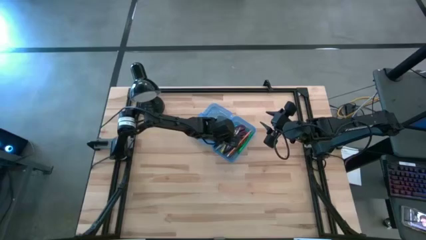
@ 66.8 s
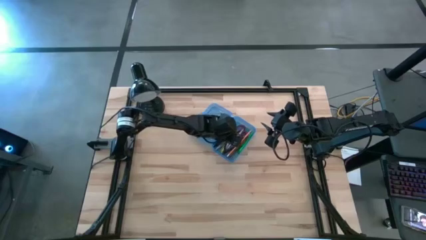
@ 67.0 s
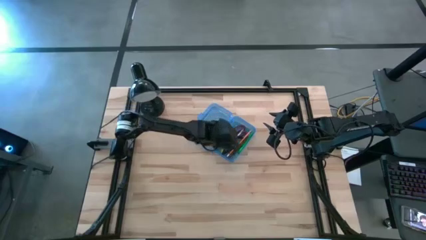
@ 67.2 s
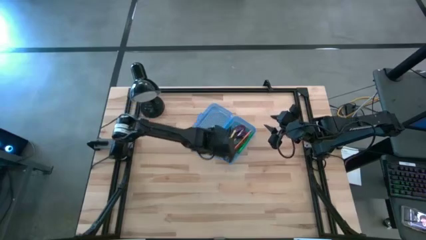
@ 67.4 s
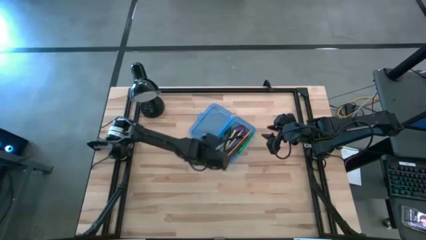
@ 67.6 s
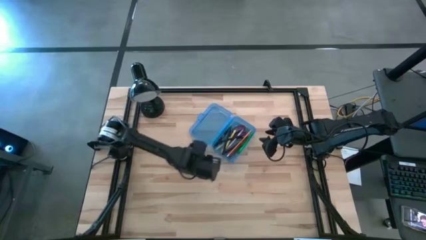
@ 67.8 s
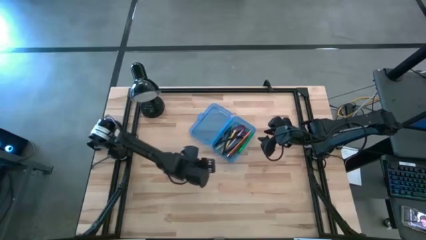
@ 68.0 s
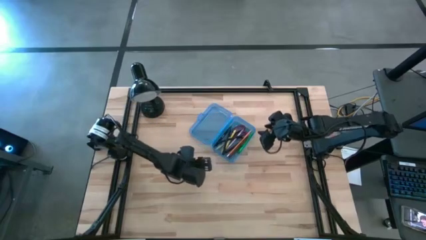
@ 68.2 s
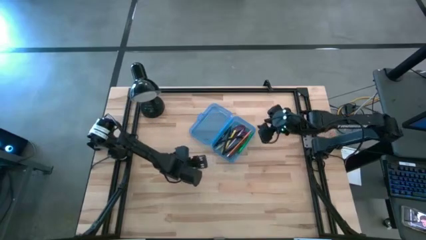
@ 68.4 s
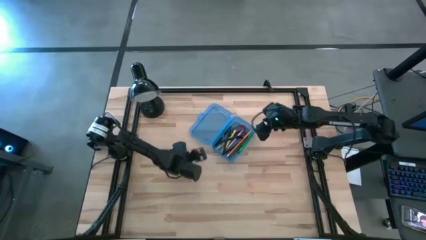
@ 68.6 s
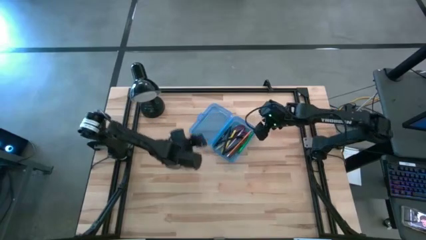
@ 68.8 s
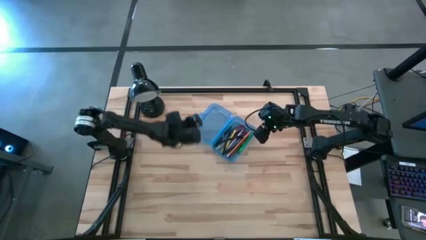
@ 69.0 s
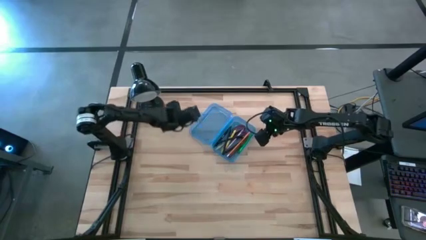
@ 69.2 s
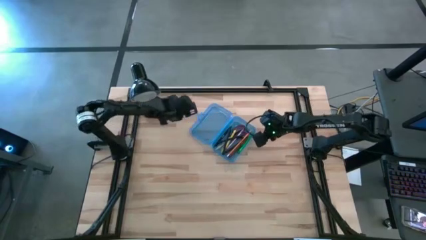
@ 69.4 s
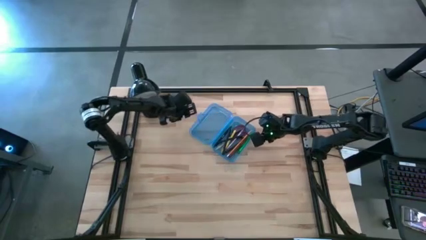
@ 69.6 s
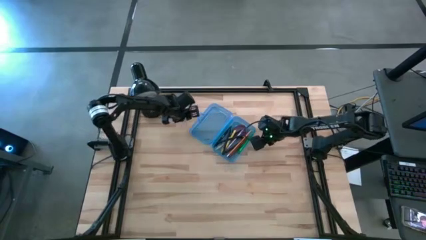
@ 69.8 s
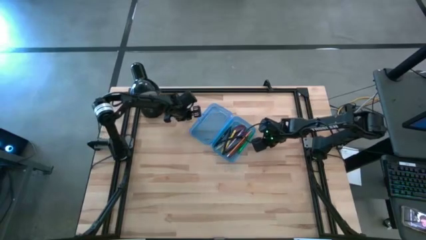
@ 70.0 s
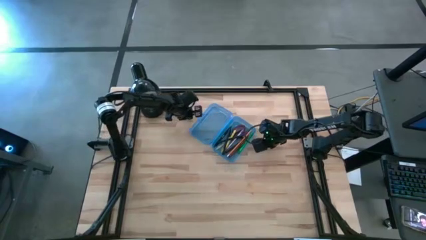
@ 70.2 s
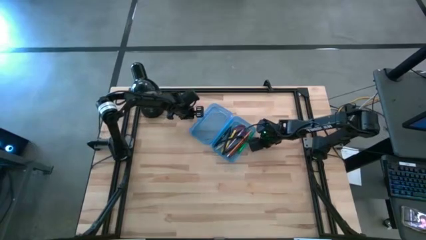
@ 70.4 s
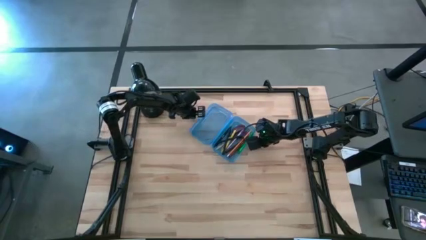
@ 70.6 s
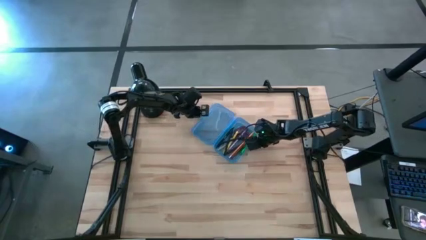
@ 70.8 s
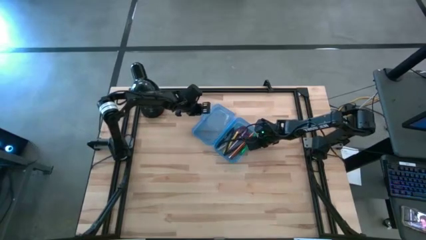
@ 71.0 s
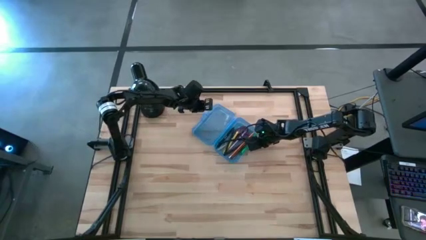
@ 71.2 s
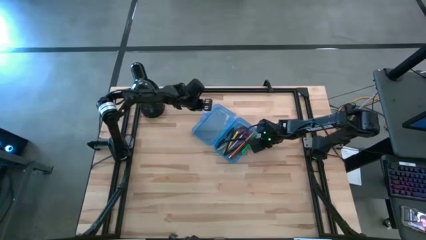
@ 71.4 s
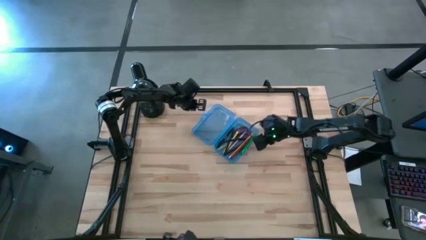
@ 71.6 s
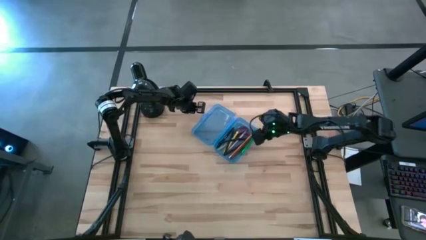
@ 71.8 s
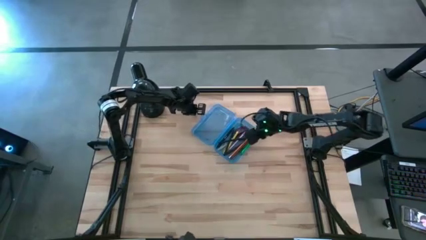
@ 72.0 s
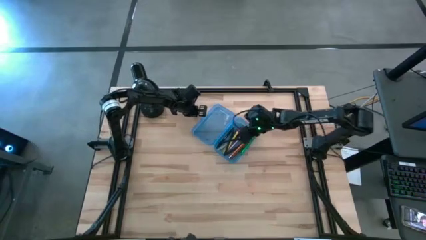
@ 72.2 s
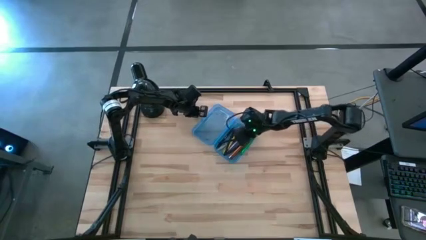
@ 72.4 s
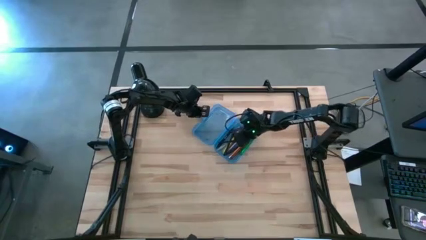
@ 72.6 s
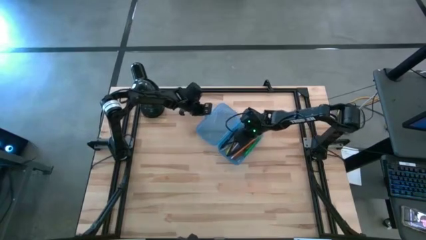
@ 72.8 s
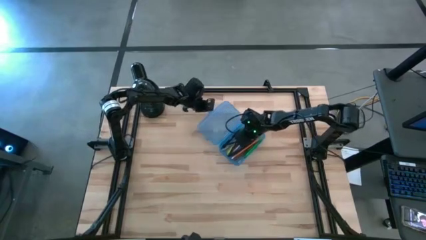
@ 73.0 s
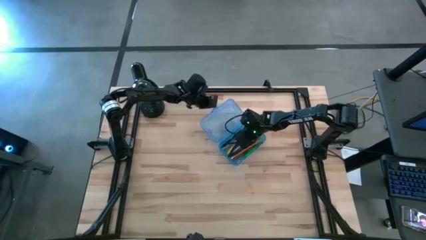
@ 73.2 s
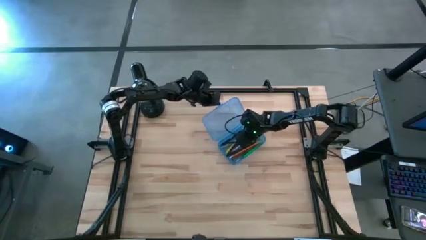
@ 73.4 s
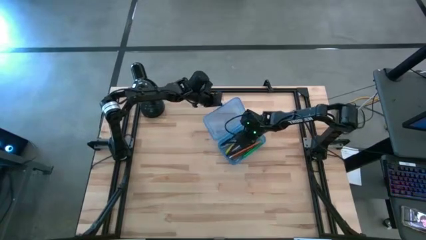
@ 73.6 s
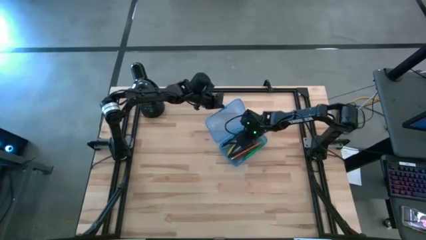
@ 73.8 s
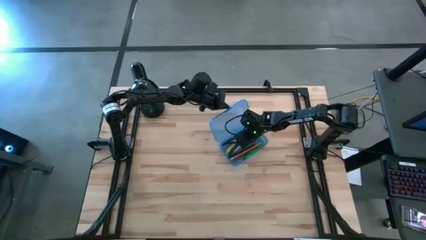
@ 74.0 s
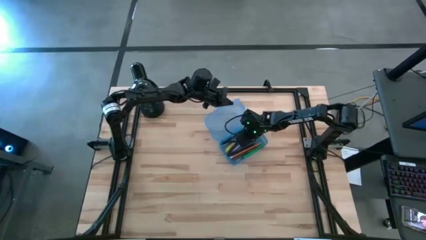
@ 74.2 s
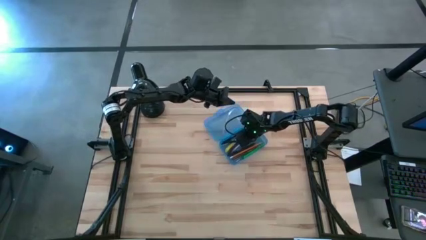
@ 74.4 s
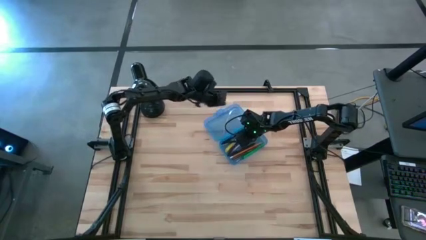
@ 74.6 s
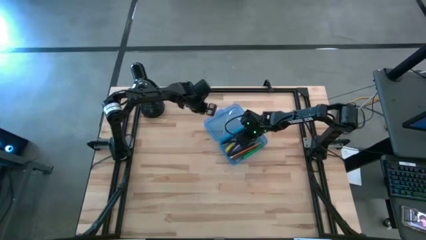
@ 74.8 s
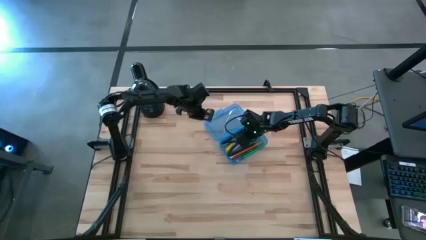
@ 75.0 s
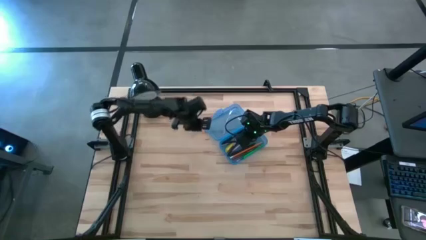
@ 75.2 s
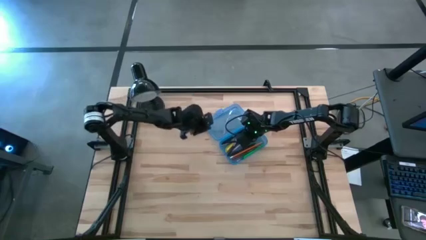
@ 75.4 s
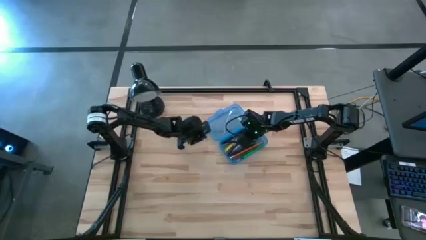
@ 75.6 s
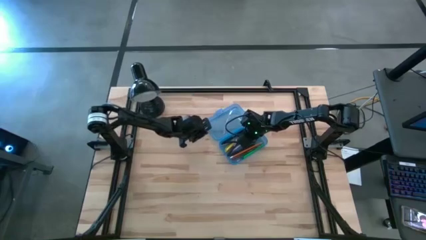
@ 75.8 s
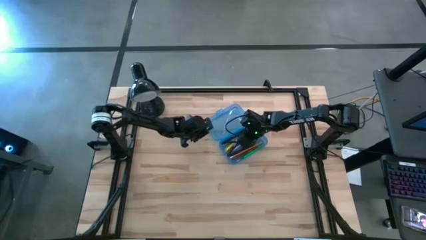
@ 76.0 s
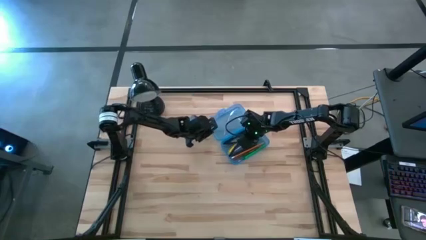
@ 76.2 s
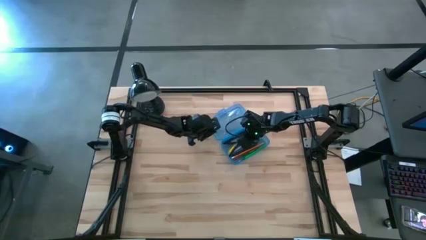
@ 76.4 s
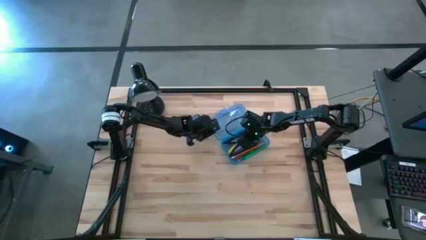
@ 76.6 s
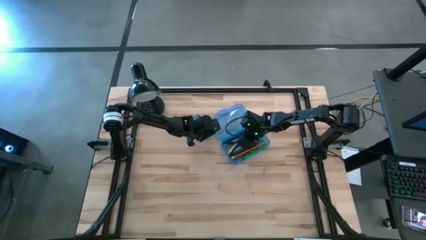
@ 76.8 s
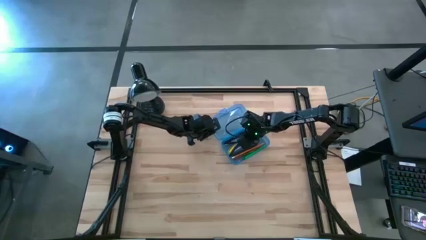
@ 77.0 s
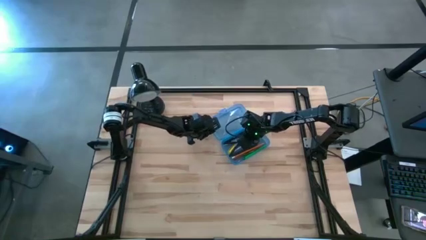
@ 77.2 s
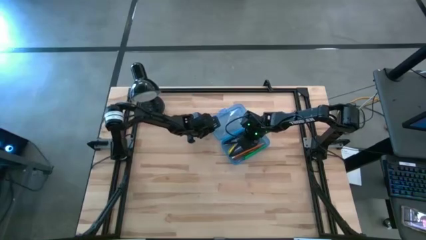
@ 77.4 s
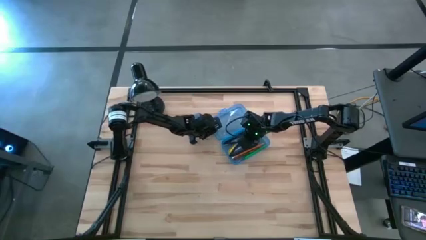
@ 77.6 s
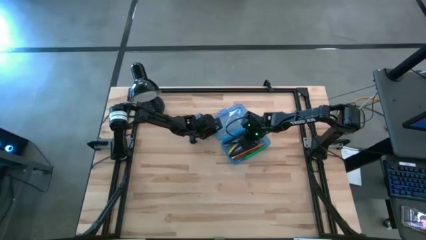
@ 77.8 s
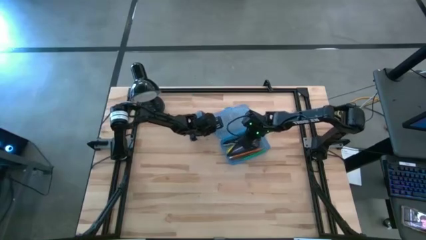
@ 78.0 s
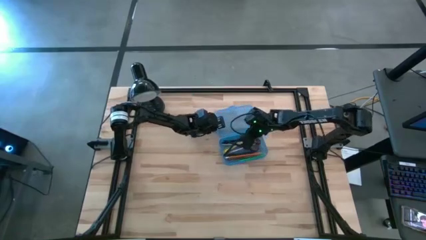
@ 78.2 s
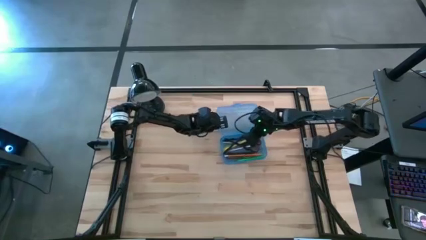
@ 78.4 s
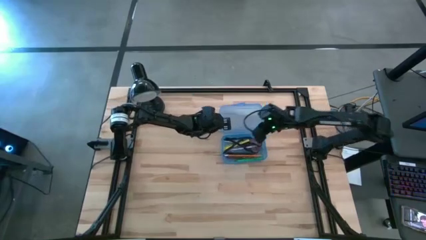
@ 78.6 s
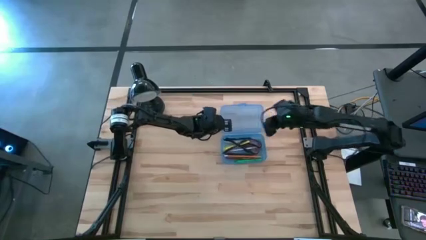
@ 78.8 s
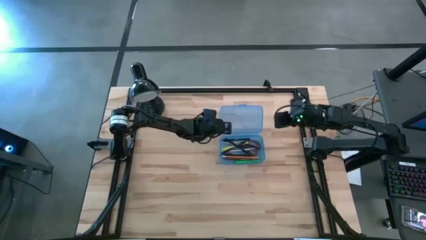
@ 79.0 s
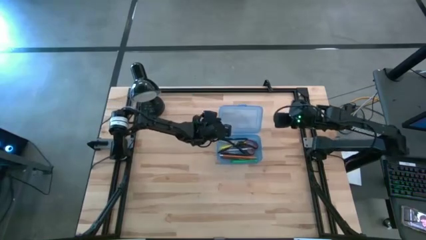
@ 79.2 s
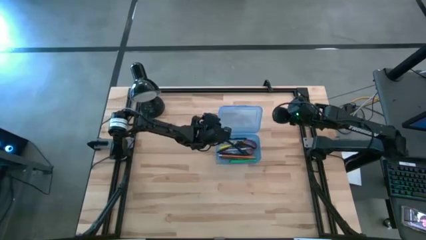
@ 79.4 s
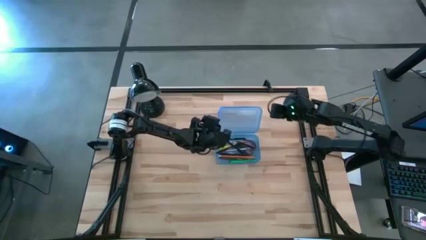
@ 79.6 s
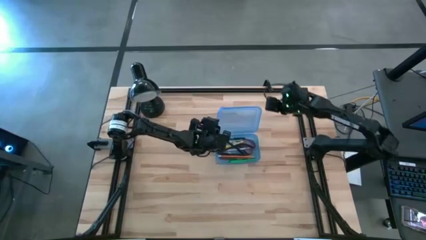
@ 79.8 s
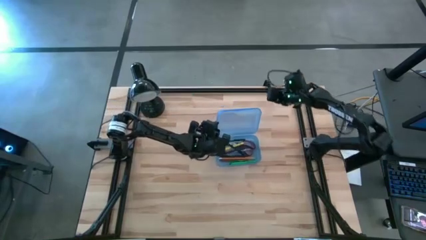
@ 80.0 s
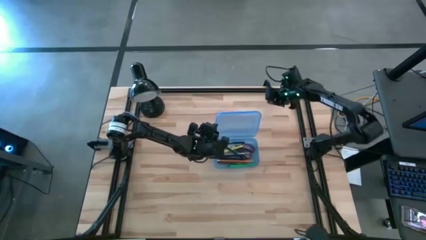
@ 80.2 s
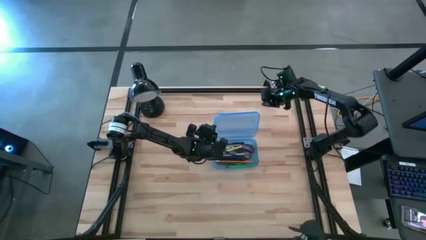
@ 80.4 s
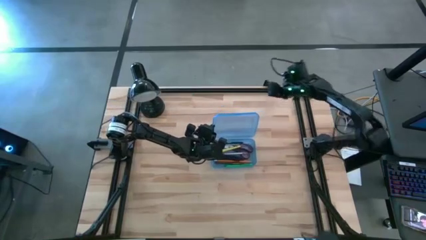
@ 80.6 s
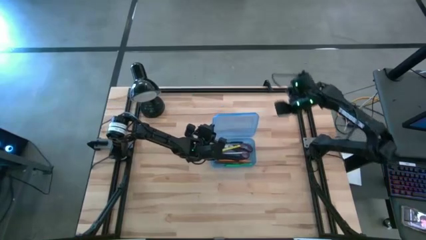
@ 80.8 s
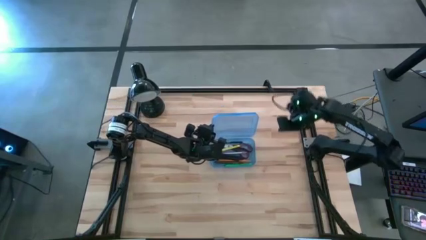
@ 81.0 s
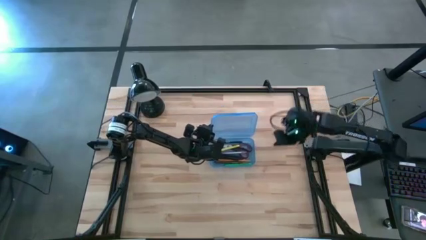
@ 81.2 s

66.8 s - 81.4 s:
Task: Pick & place school supplies into a supply box
Close the supply box
